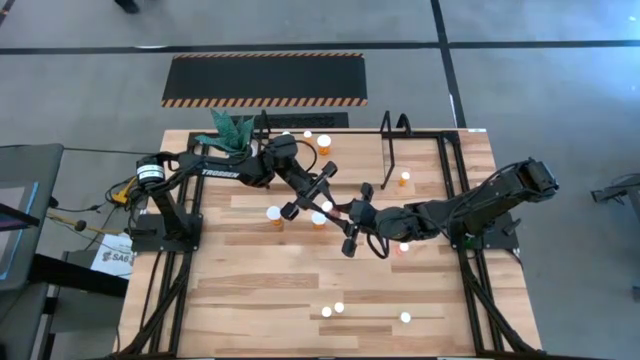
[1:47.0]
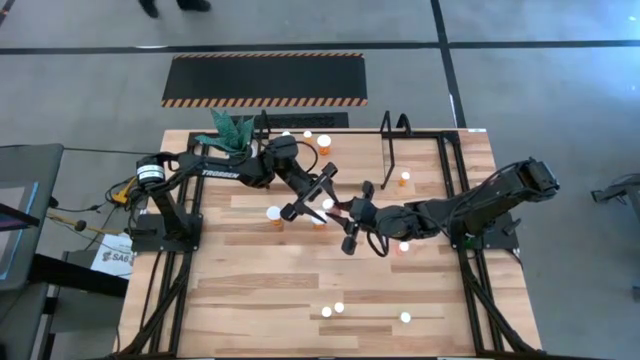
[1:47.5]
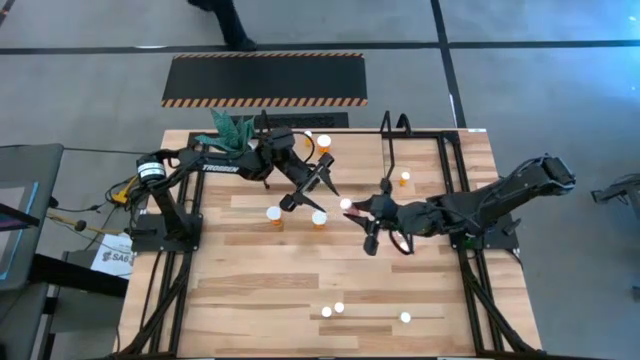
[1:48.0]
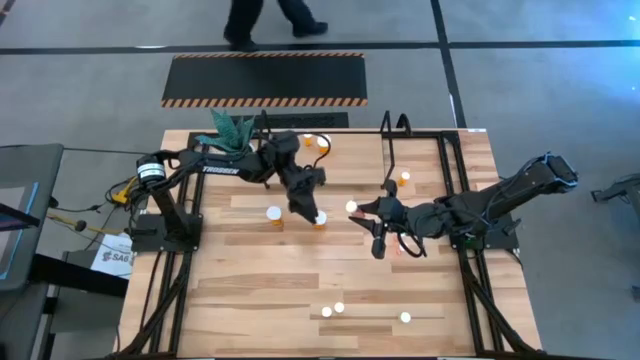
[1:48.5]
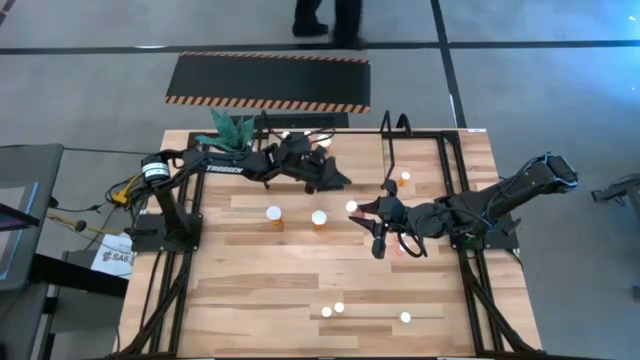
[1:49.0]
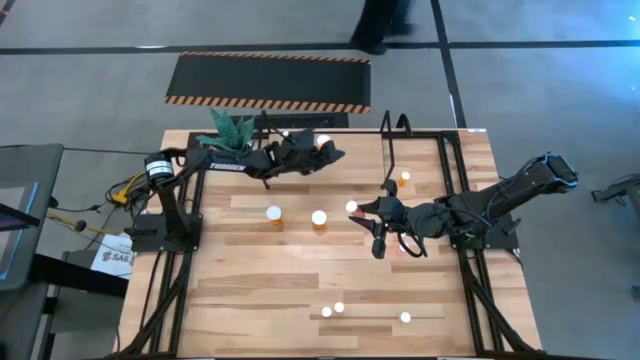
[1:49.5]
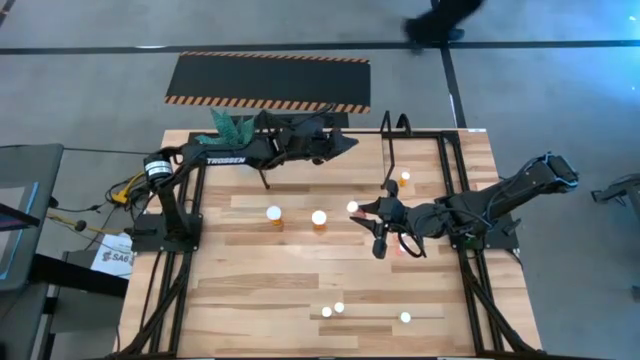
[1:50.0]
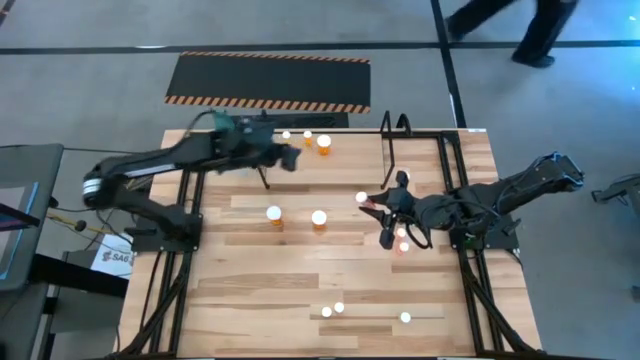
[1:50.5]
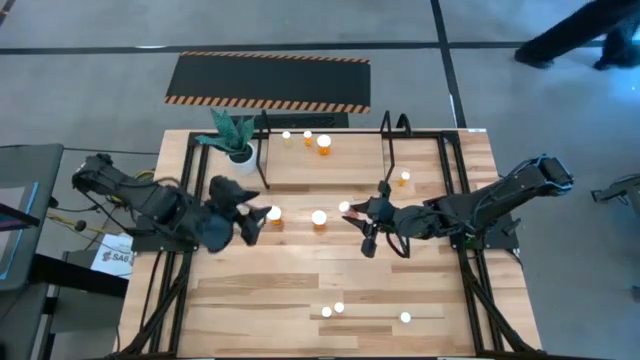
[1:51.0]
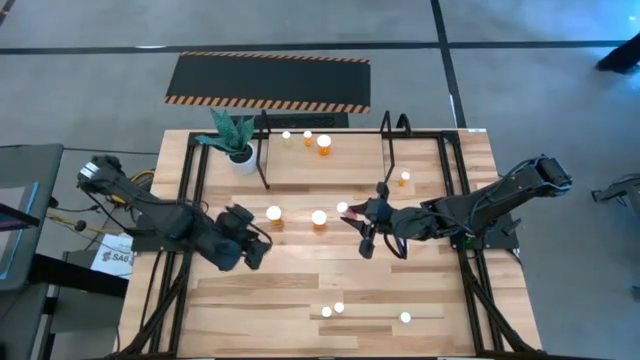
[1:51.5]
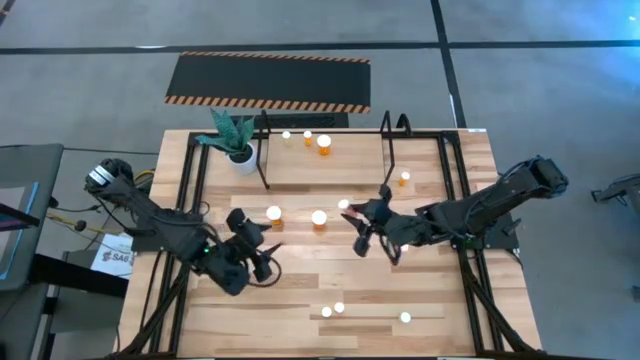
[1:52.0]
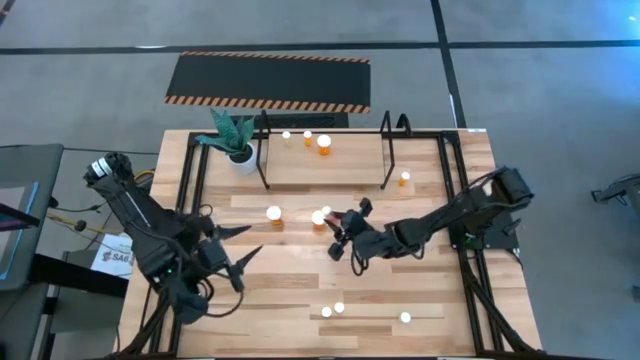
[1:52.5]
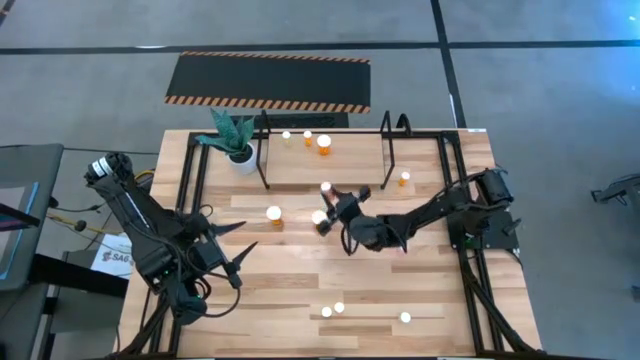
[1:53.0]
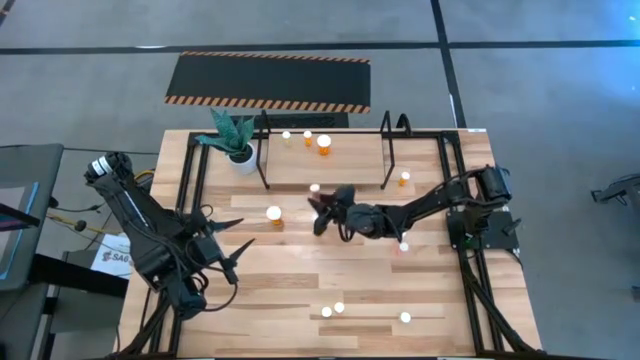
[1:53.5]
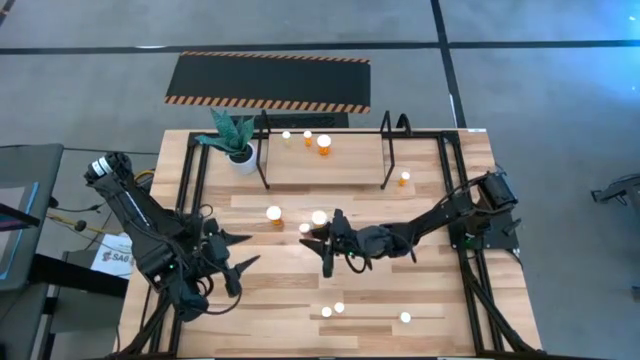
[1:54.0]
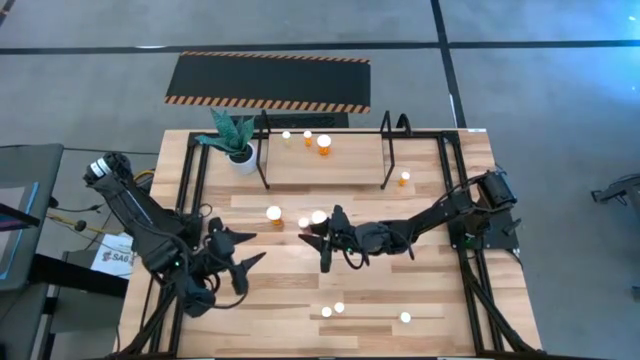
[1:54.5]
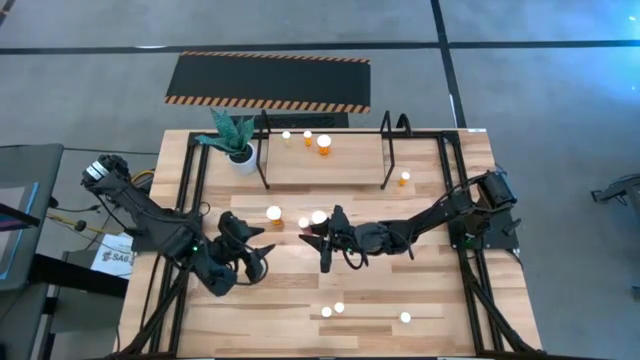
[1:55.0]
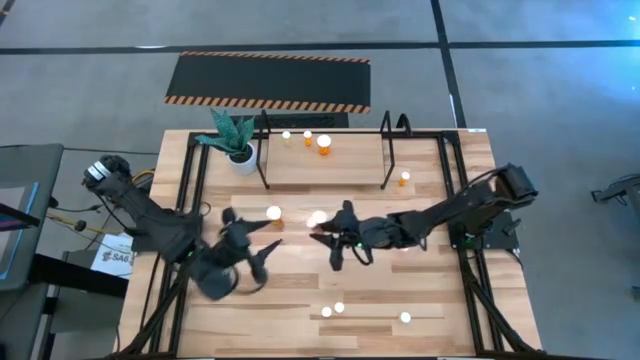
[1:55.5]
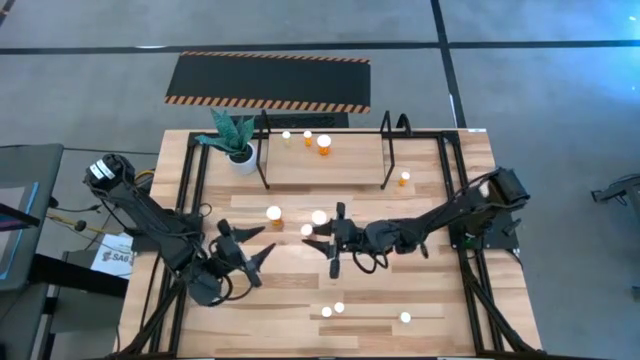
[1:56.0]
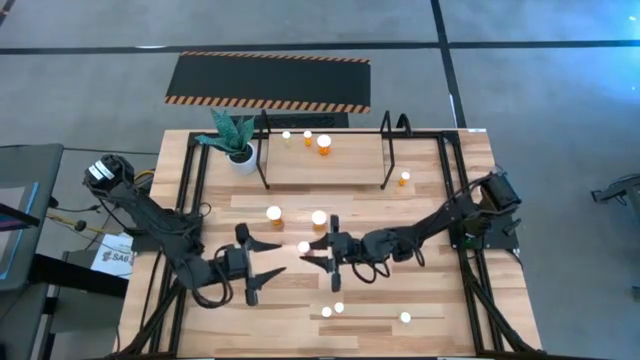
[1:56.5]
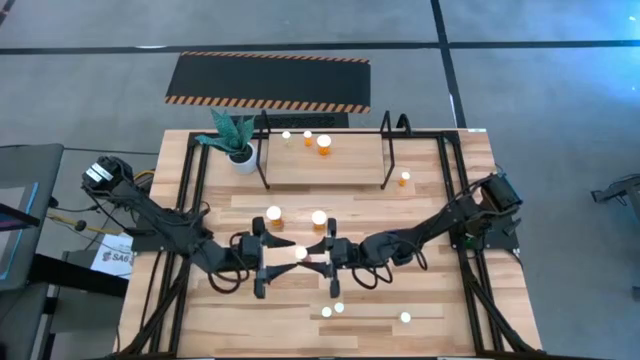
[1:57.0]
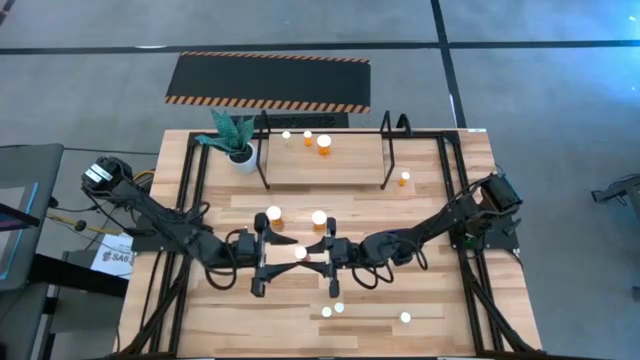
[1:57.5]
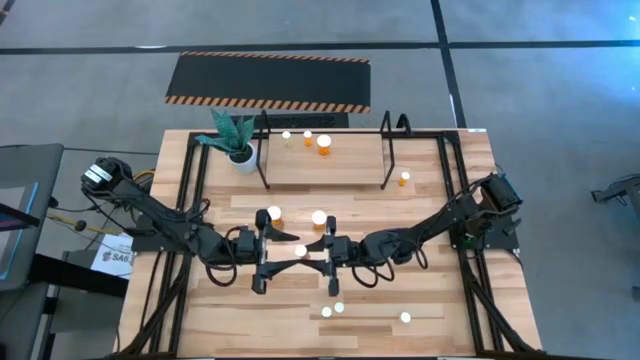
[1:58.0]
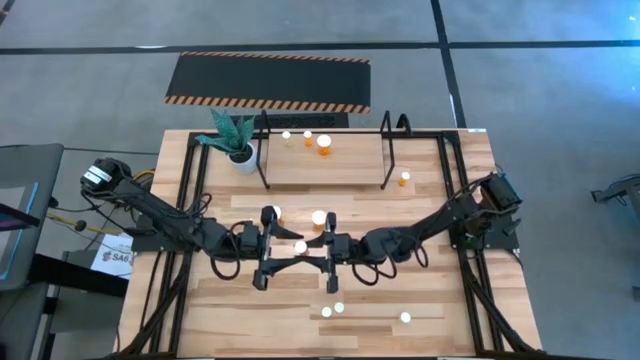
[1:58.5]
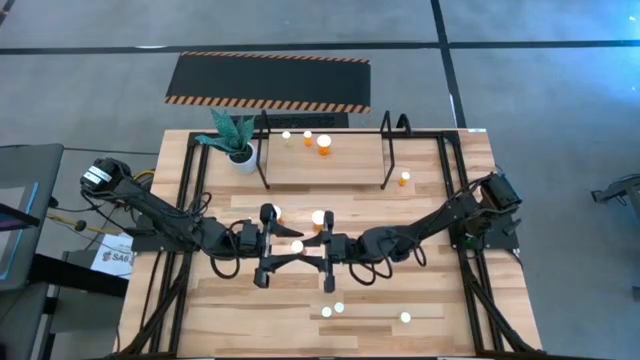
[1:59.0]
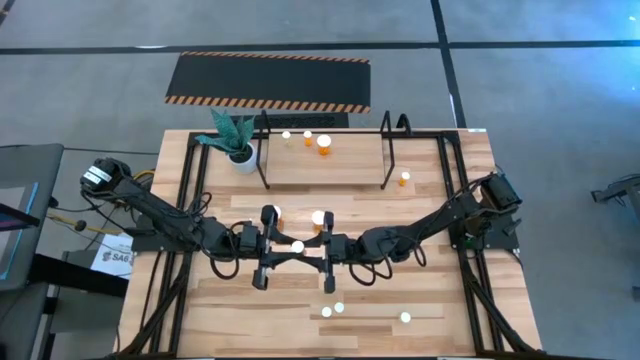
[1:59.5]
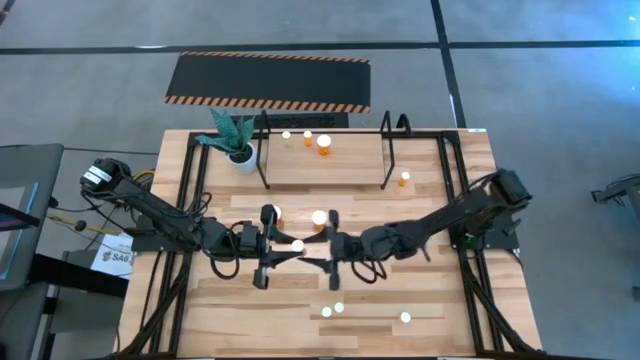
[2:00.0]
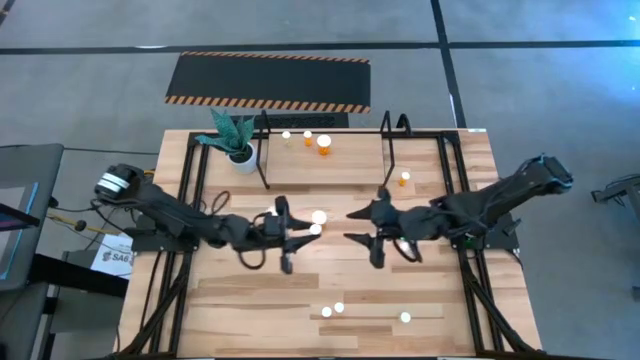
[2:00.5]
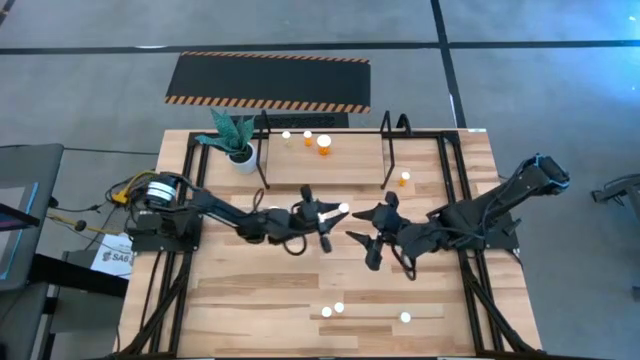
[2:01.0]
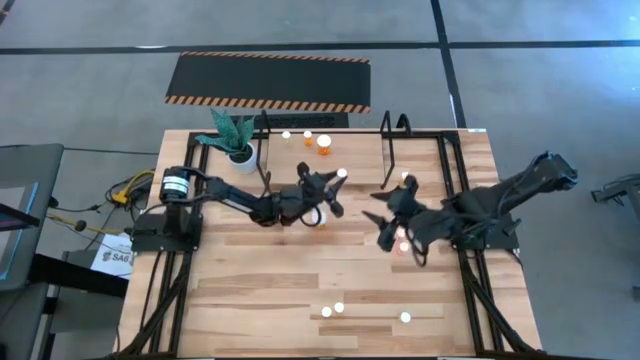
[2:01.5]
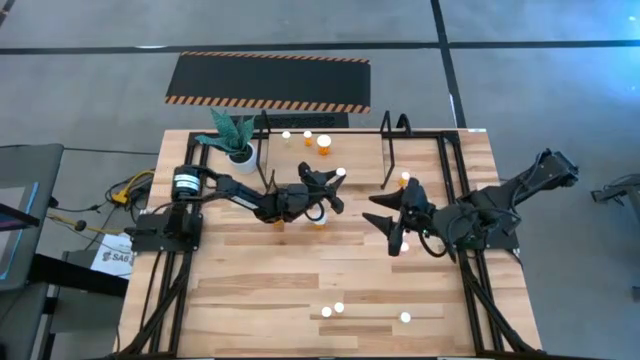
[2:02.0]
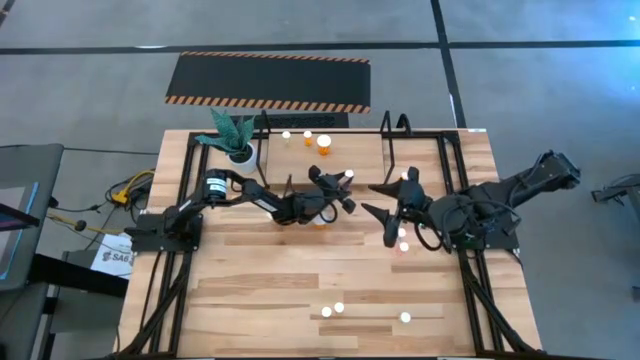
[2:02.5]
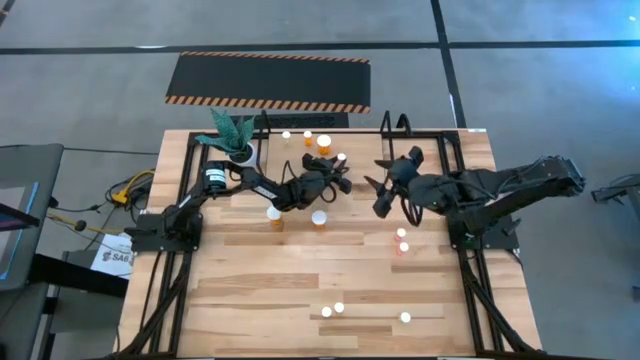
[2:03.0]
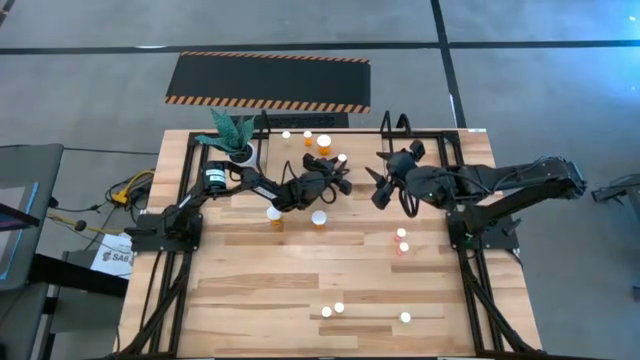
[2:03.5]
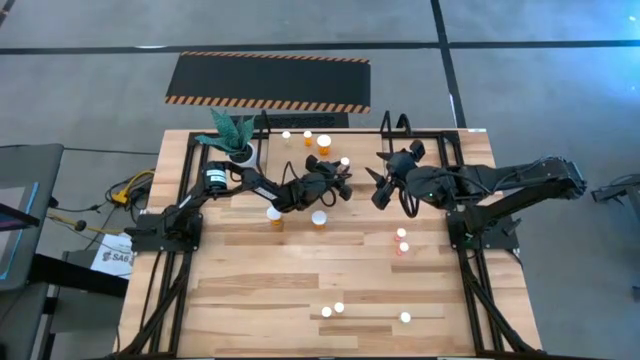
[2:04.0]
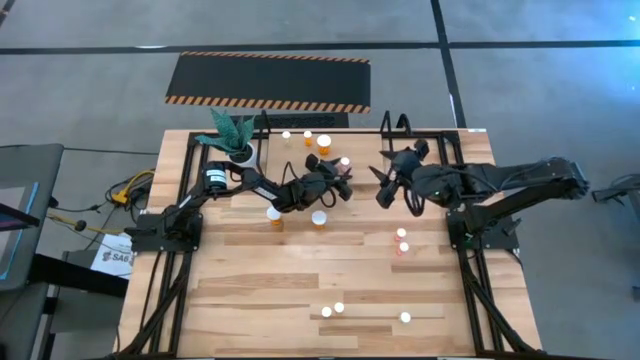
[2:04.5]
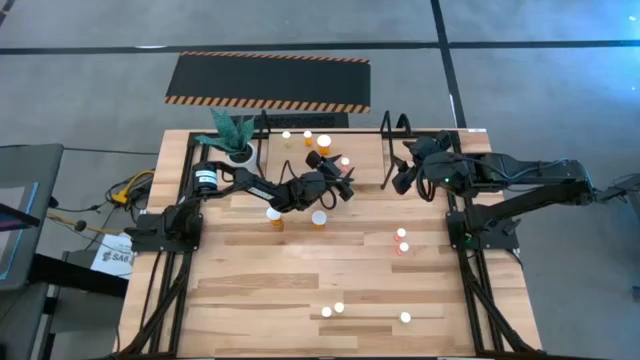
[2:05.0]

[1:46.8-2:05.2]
Task: Pick and place medicine bottles onto shelf by color
Put the bottom left pink pill bottle on the shelf
